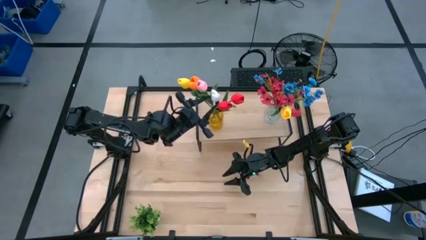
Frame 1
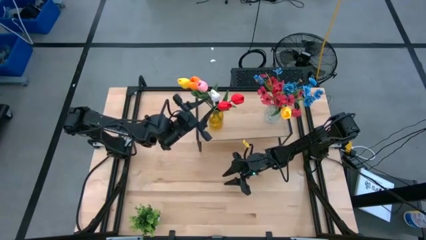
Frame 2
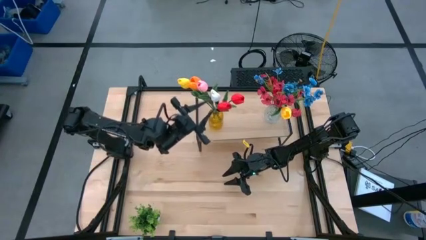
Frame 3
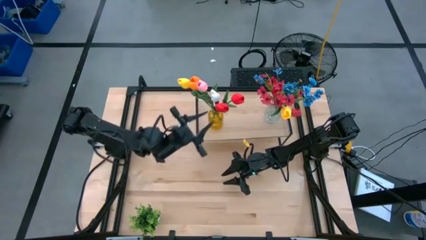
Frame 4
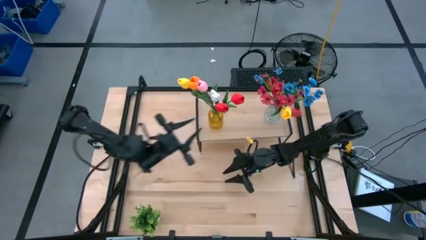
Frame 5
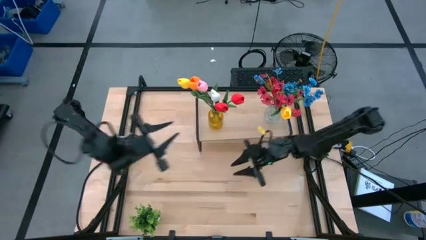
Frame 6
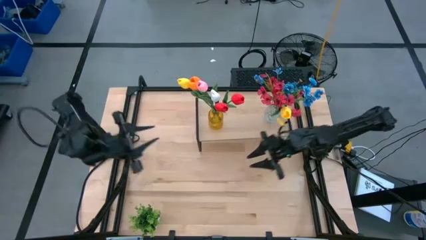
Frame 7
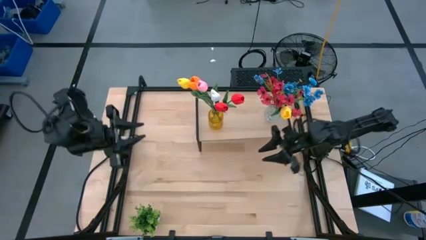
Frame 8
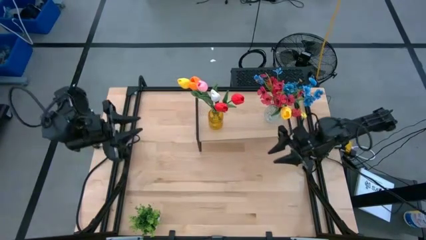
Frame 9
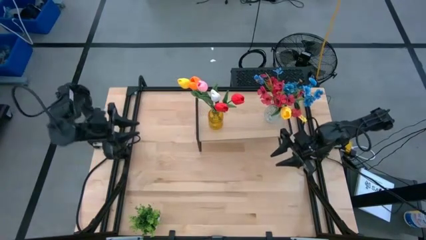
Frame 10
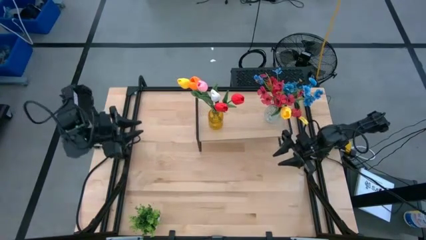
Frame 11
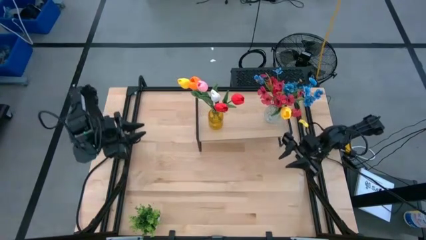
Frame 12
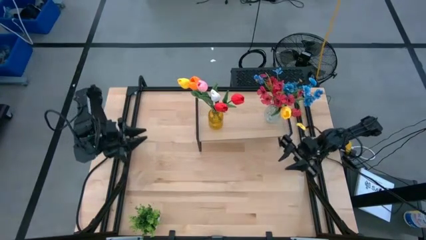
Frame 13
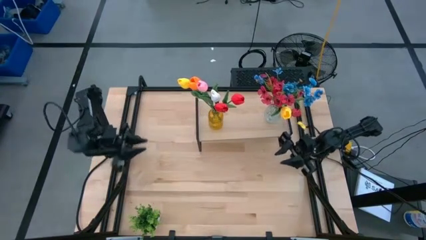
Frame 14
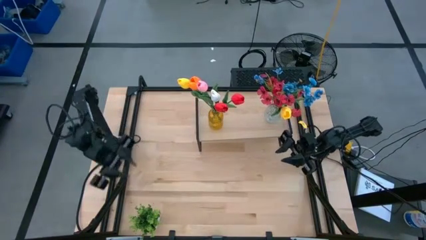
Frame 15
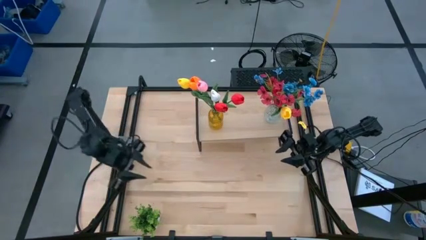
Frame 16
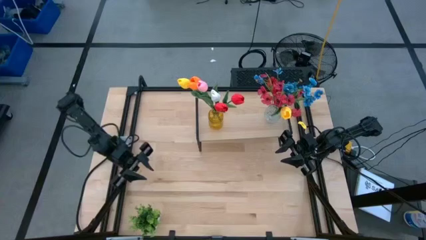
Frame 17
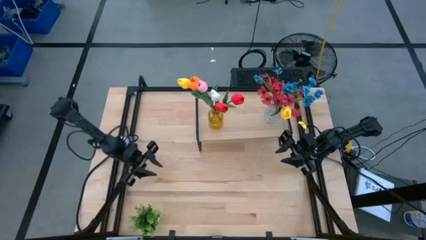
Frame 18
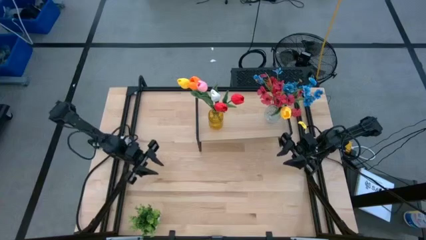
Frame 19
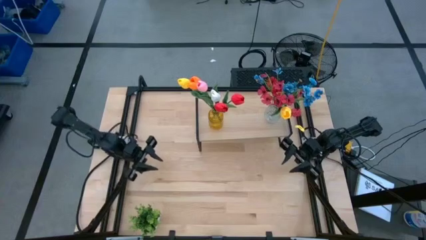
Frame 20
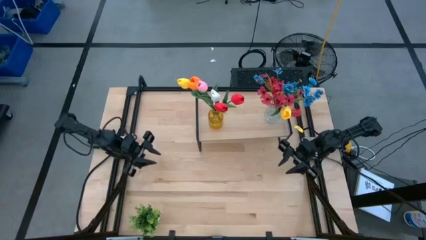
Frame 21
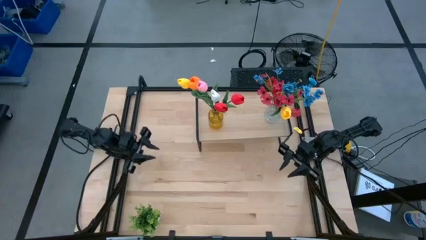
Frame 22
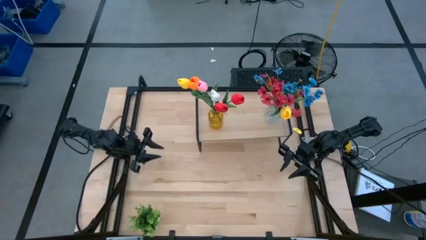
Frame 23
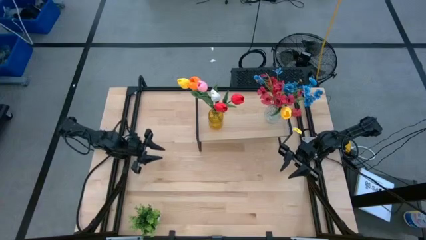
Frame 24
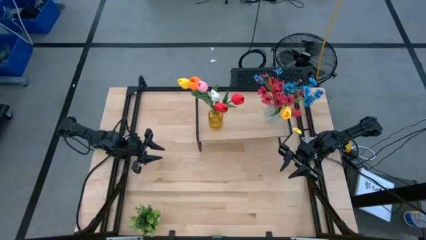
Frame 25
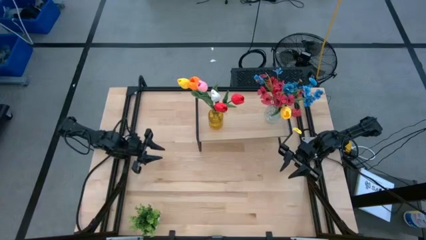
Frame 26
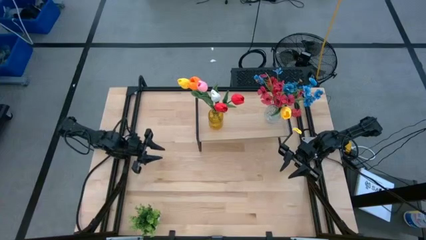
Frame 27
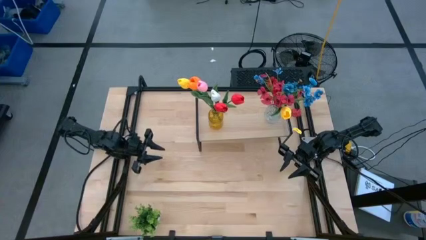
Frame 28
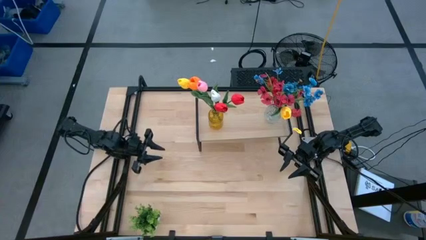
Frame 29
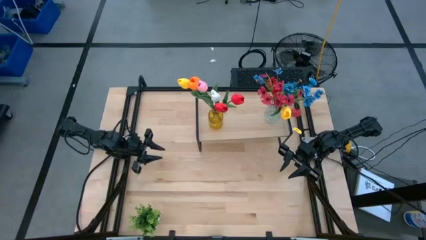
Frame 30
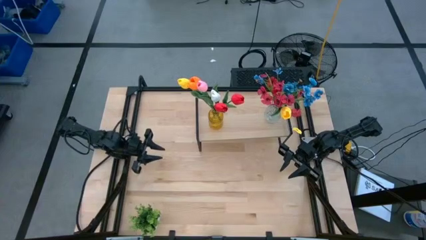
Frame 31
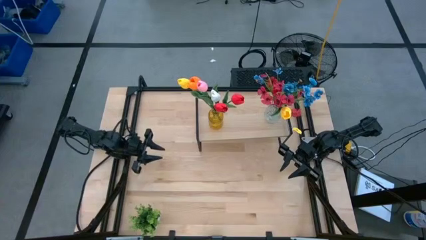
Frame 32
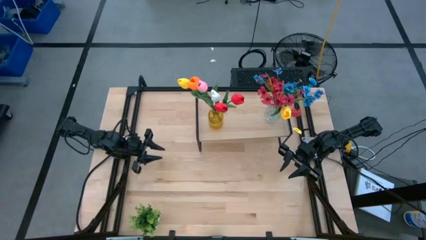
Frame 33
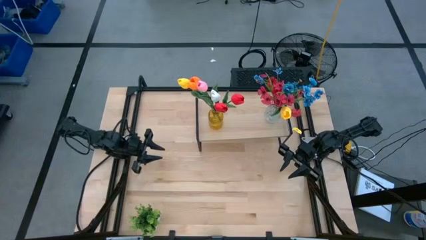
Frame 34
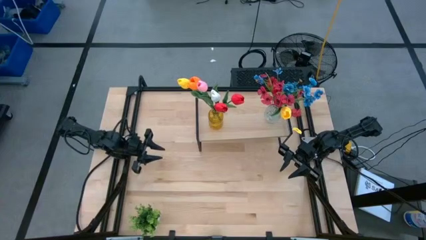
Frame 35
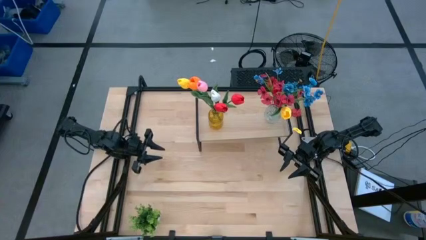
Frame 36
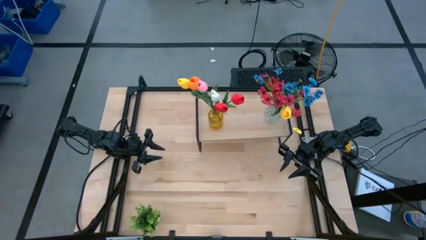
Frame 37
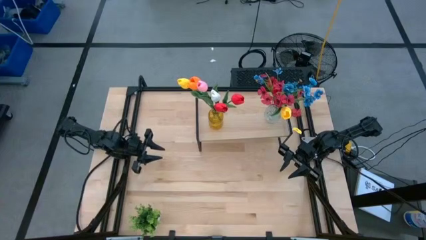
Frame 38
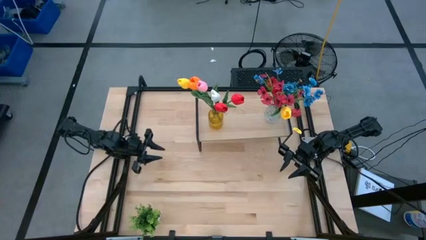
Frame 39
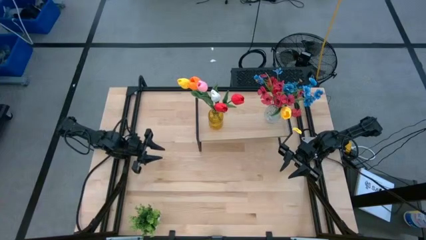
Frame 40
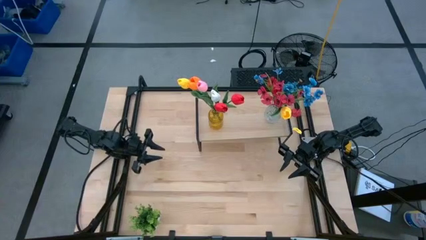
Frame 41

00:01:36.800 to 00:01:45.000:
Task: Pick and place flowers into a vace then onto a shelf
Return to Home Position

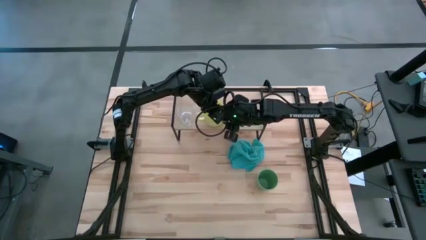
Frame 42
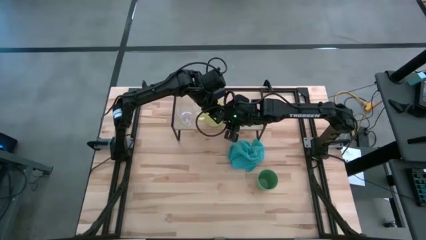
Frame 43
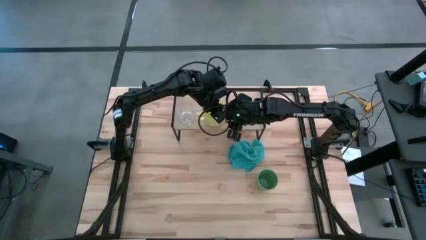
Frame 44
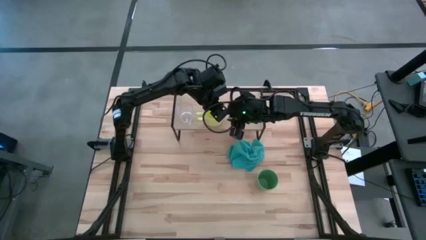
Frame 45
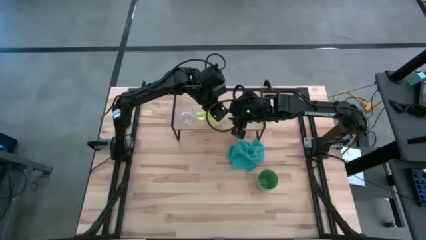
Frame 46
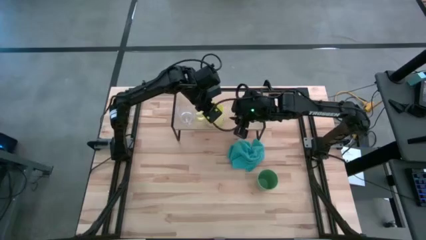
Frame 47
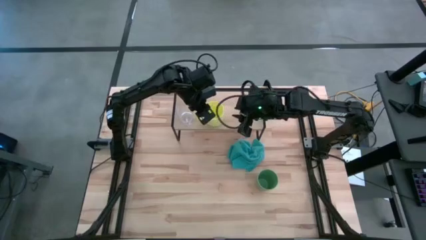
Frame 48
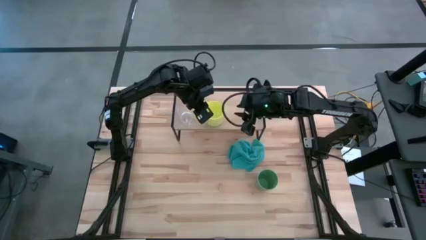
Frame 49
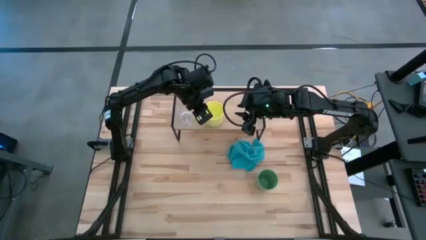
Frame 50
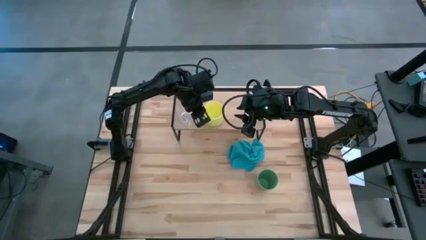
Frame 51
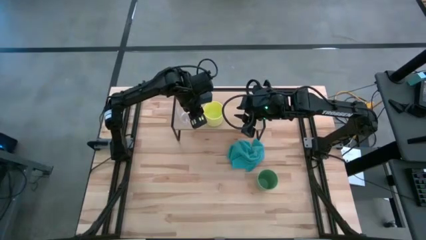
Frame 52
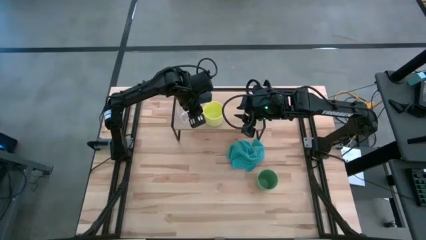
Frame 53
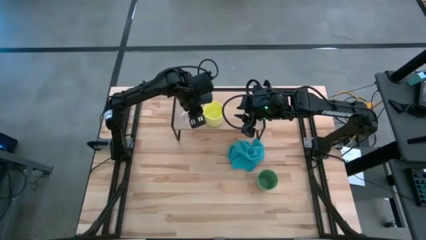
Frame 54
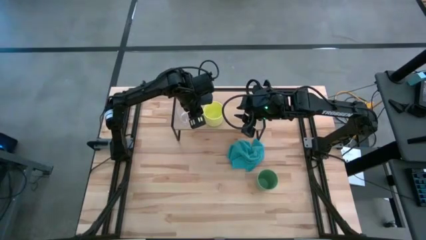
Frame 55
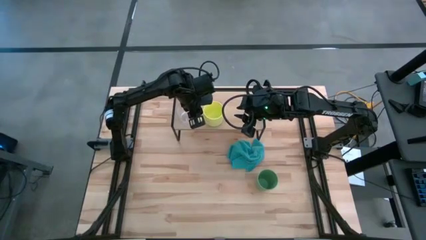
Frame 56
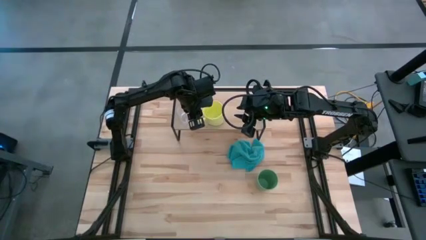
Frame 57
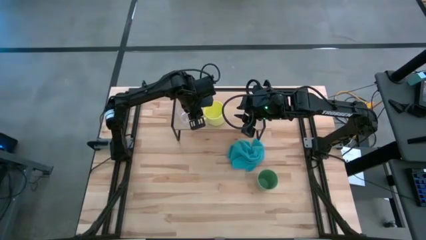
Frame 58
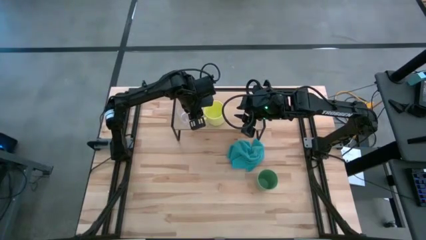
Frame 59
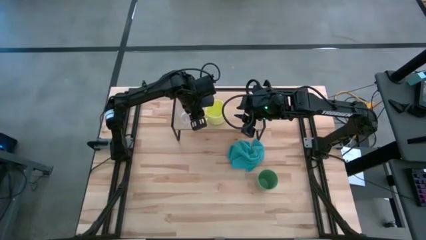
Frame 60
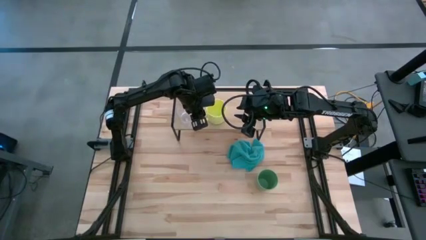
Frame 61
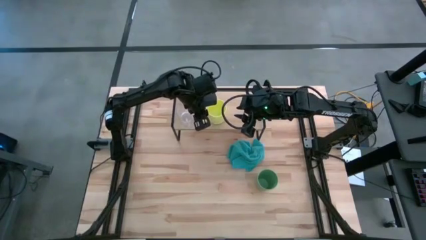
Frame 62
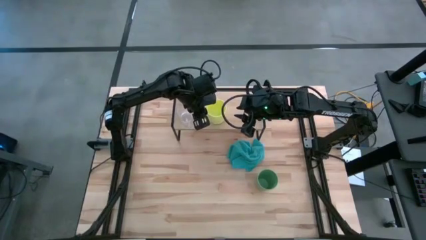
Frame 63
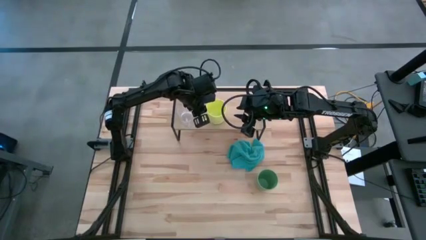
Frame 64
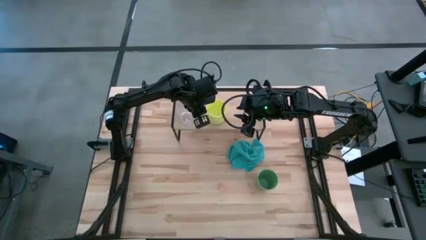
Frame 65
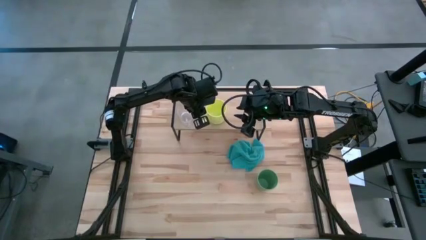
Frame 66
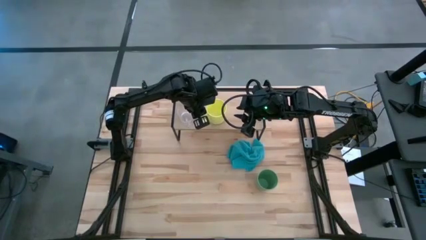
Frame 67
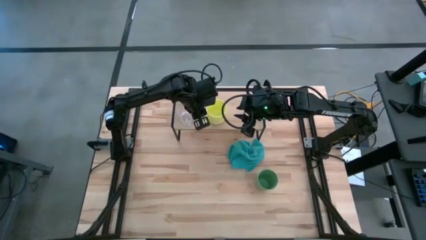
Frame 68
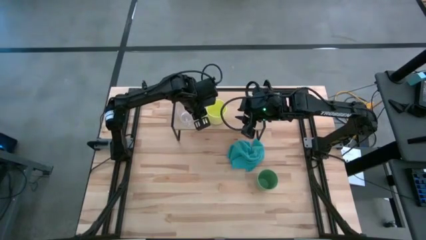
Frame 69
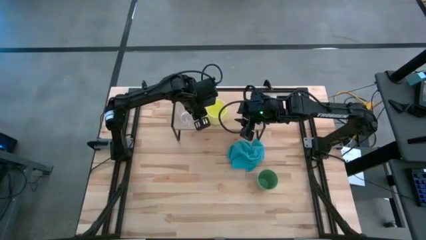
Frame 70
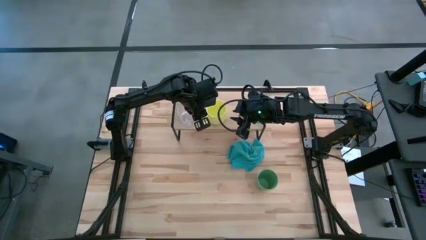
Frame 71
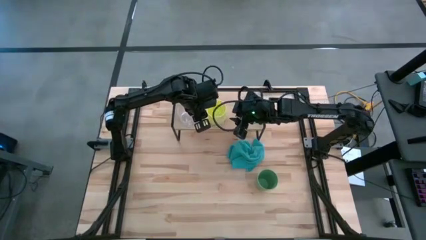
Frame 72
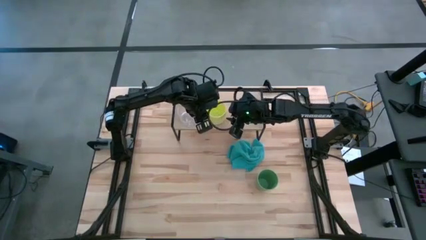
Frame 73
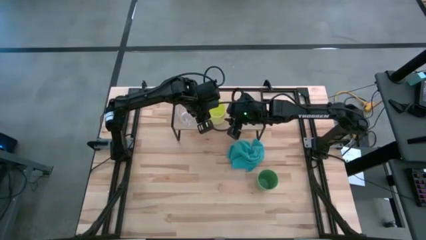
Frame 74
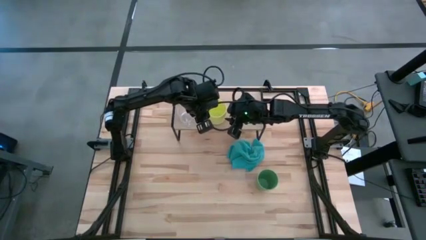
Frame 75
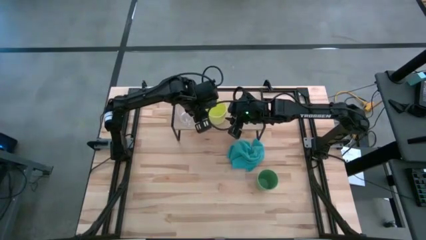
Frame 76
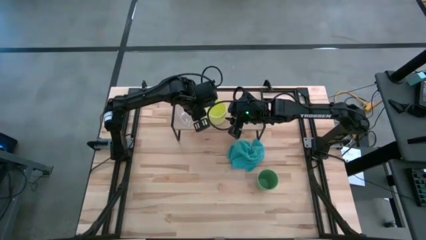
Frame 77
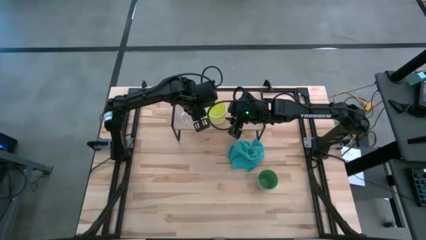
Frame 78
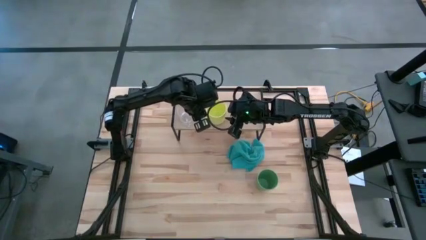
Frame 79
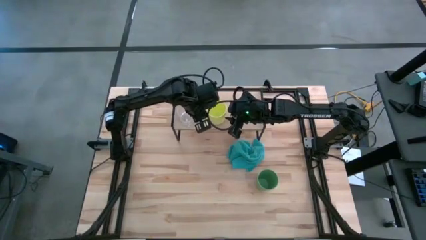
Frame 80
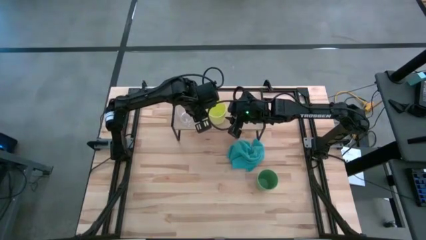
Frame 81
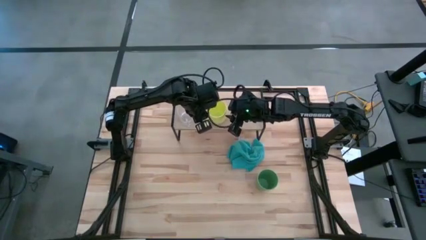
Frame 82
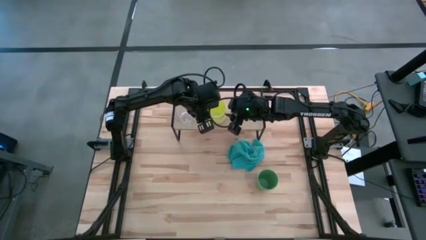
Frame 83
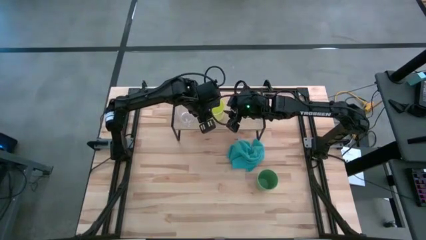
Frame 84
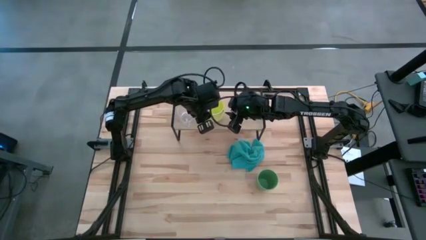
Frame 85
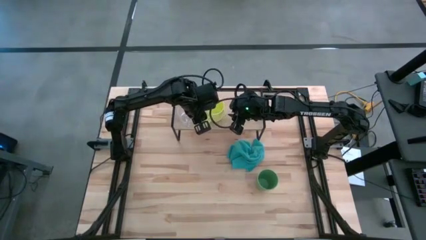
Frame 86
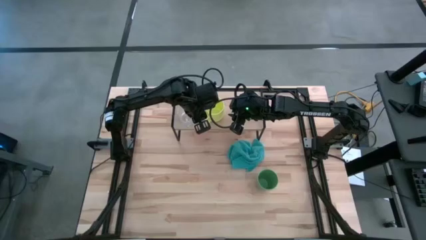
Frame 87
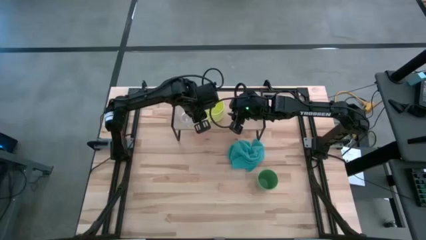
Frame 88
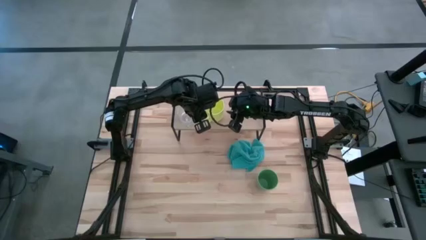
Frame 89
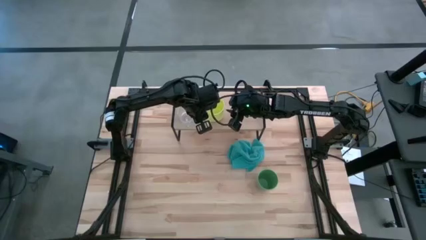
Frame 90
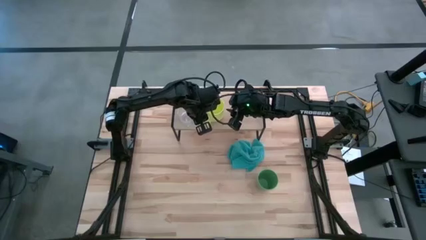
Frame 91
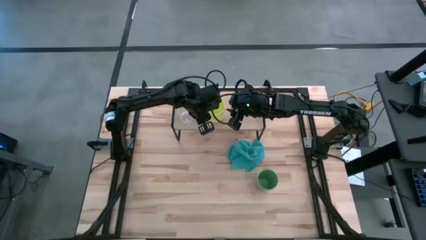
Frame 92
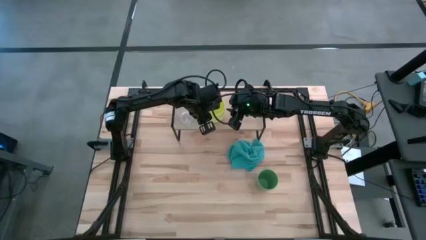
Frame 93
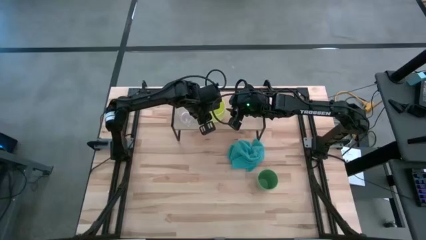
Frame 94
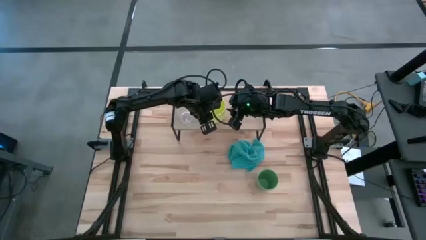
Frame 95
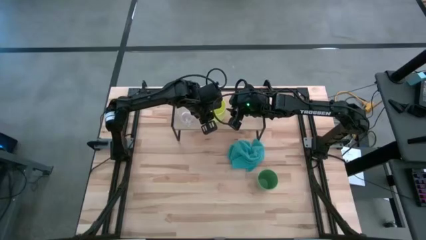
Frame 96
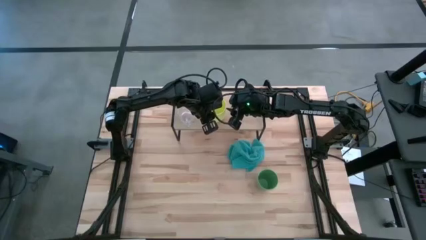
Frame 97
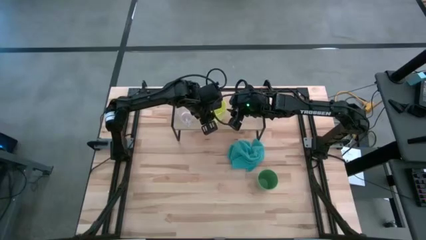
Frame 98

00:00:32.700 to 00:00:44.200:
Task: Stack small to large cups/mugs on shelf
Put the yellow mug on the shelf
